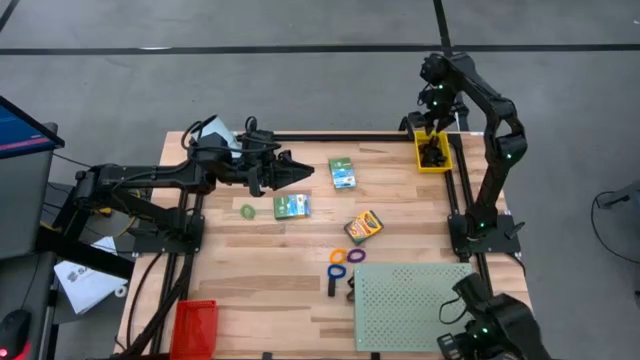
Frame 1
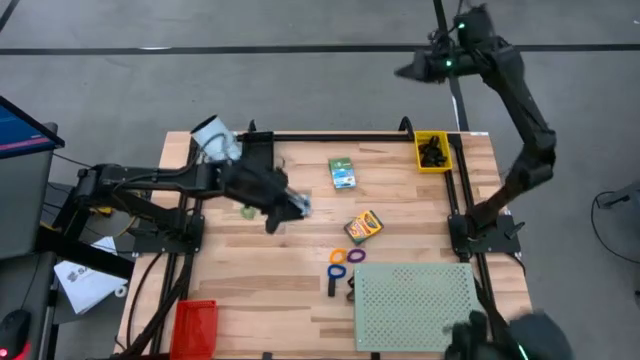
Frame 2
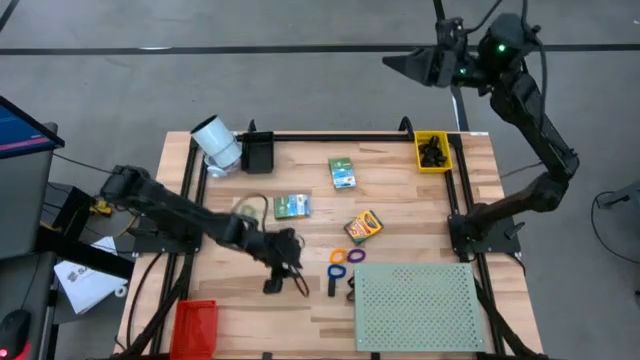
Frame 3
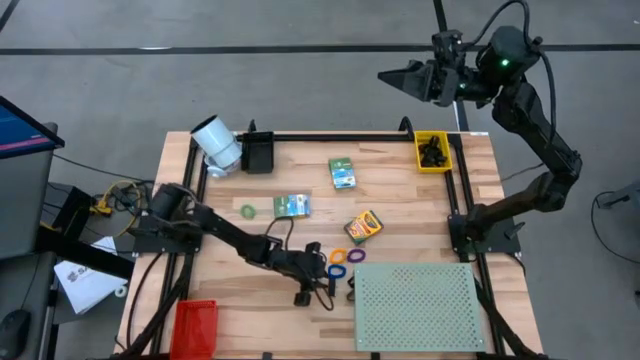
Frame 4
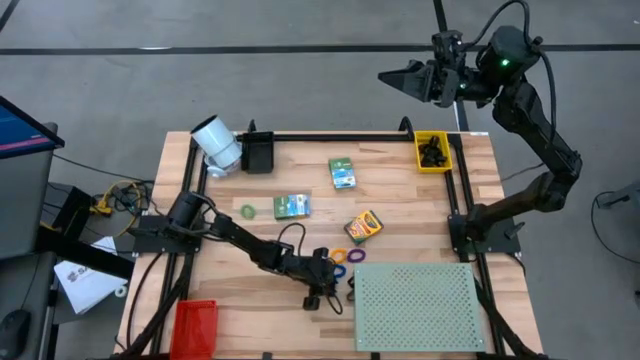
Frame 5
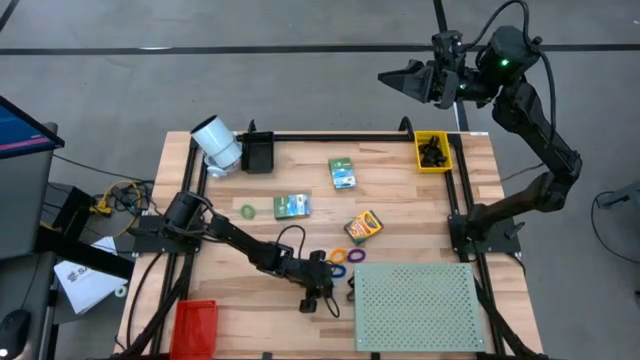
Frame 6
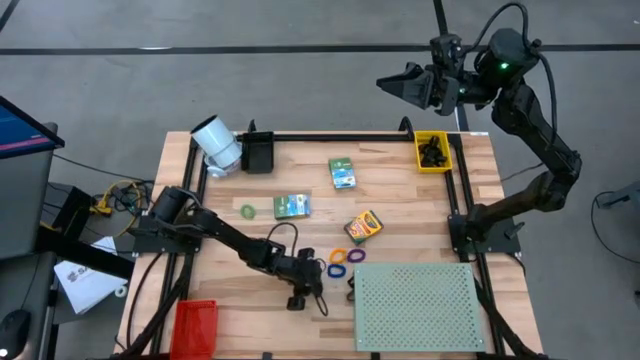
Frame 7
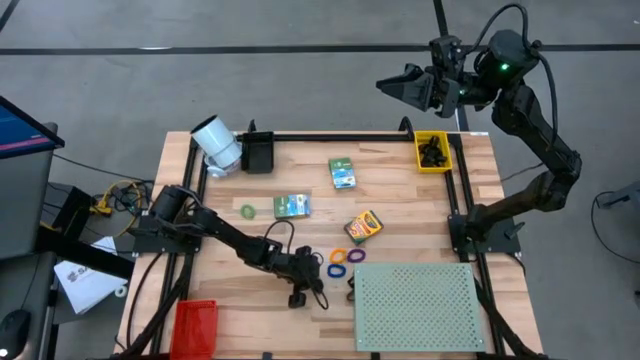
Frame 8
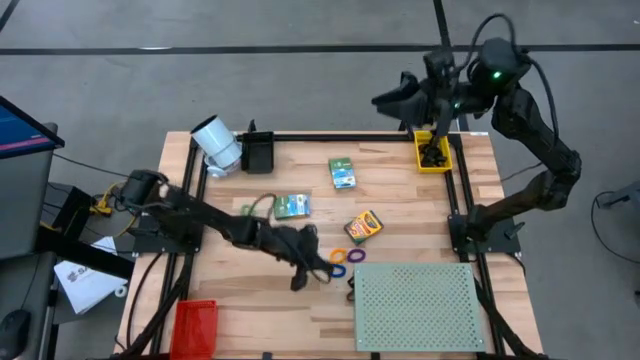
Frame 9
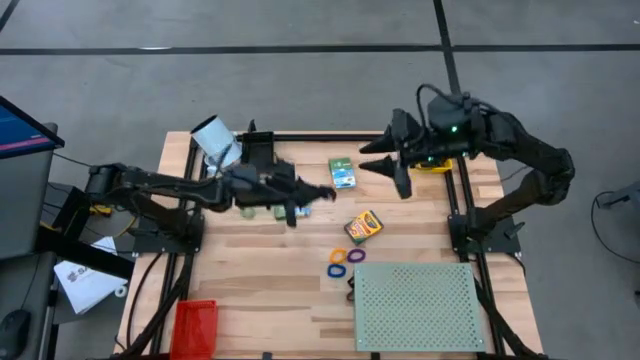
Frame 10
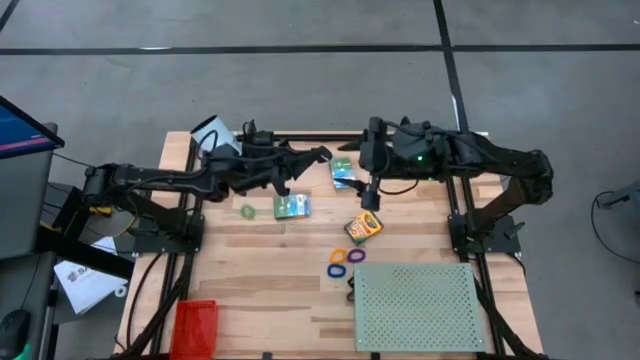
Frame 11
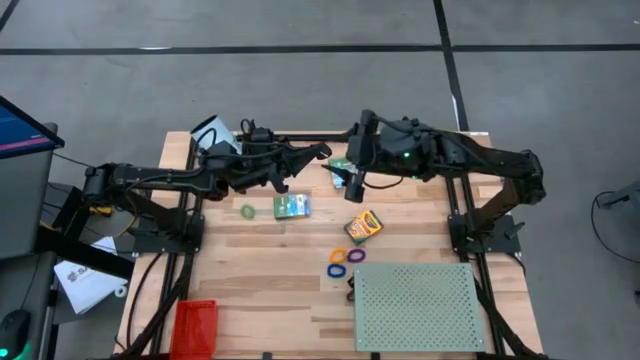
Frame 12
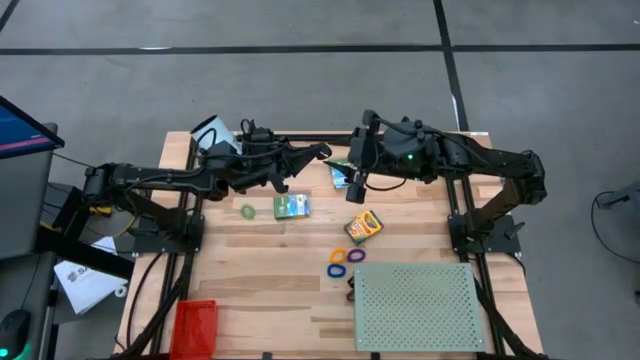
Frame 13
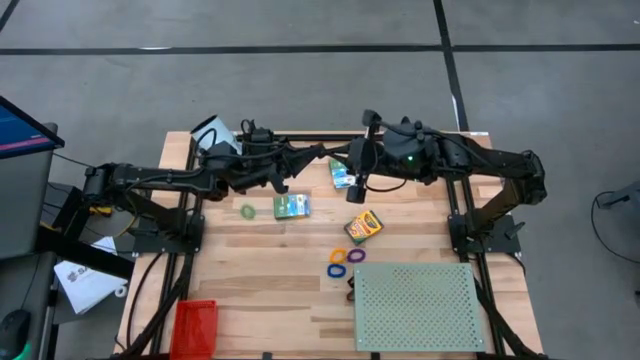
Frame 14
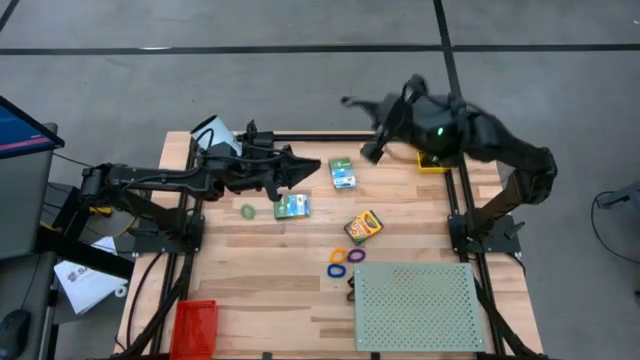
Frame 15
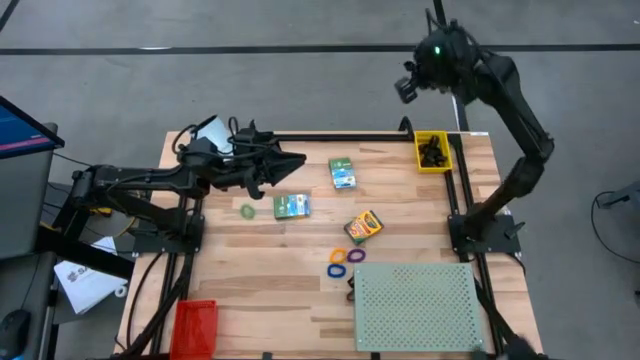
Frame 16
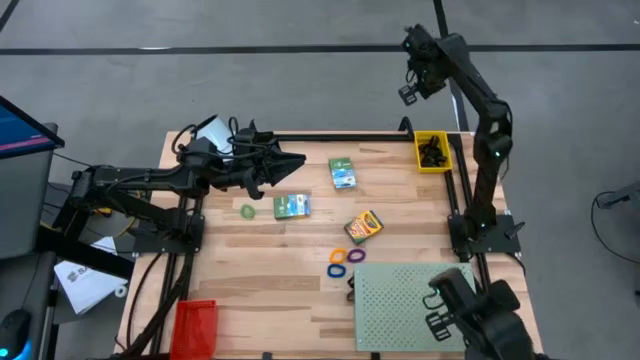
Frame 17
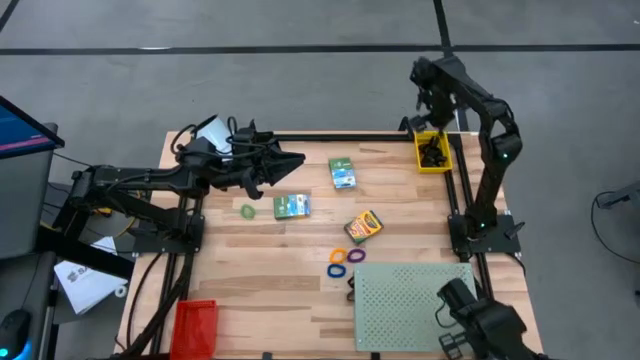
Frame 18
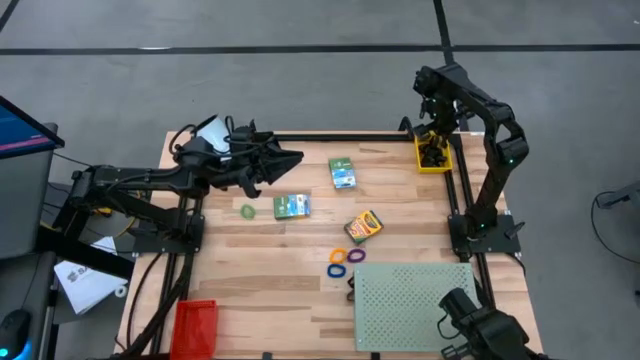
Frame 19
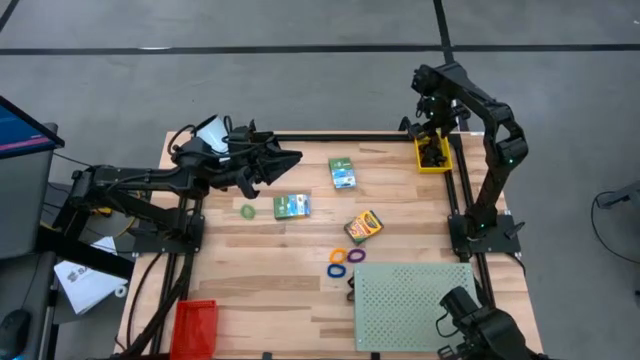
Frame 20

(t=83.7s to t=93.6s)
Task: Pick & Place Office Desk Supplies
Put the black rubber band into the yellow bin

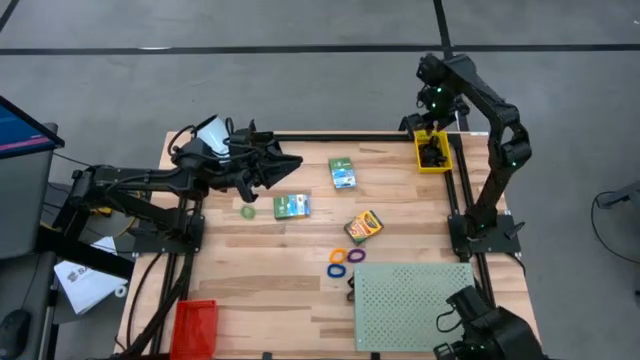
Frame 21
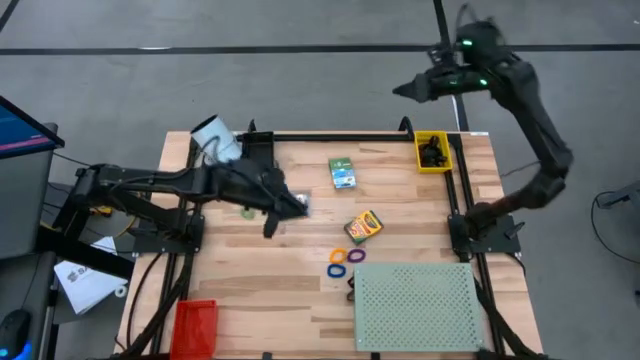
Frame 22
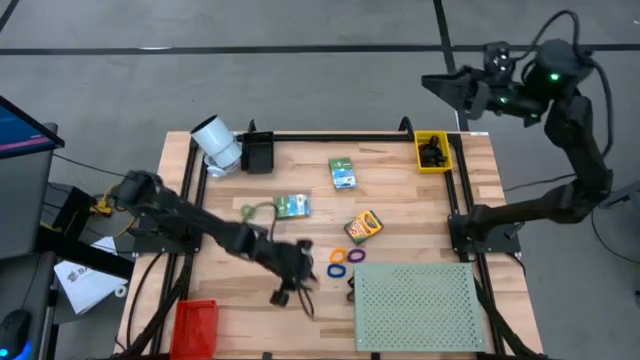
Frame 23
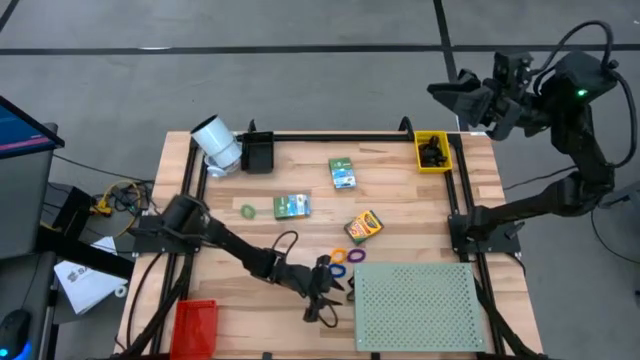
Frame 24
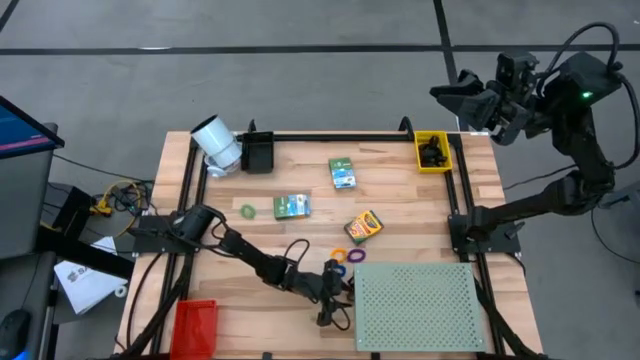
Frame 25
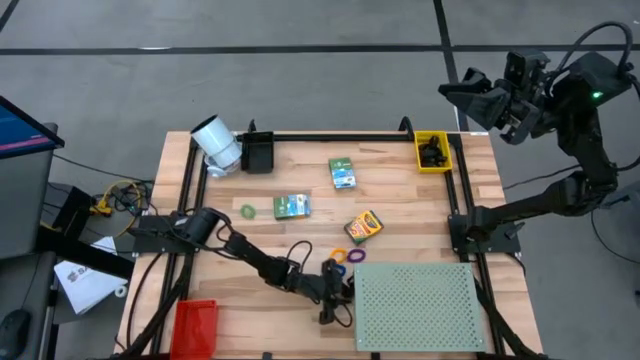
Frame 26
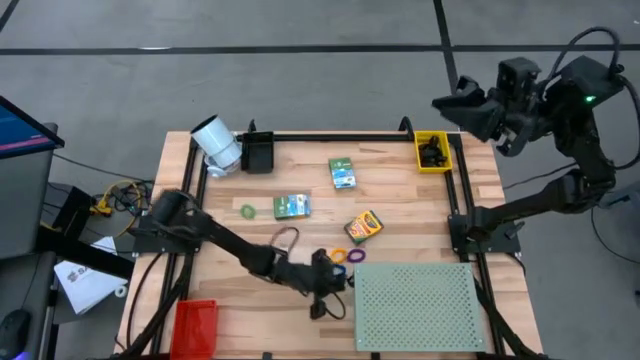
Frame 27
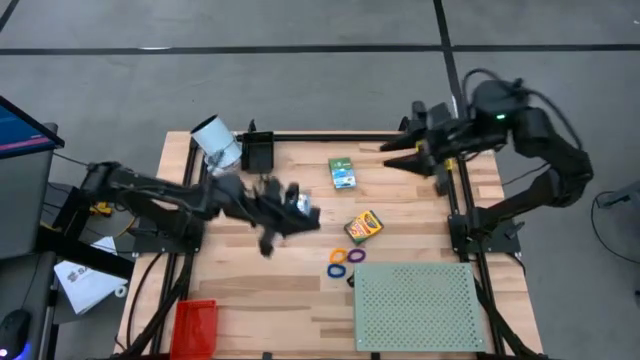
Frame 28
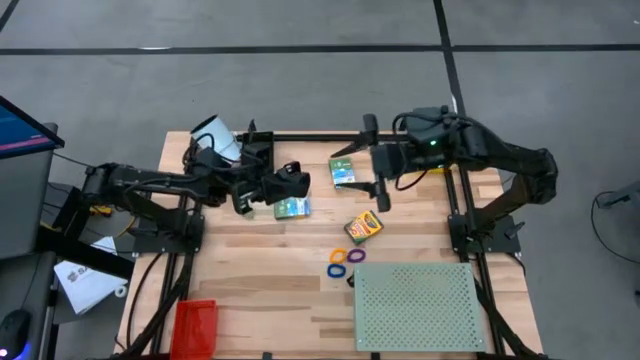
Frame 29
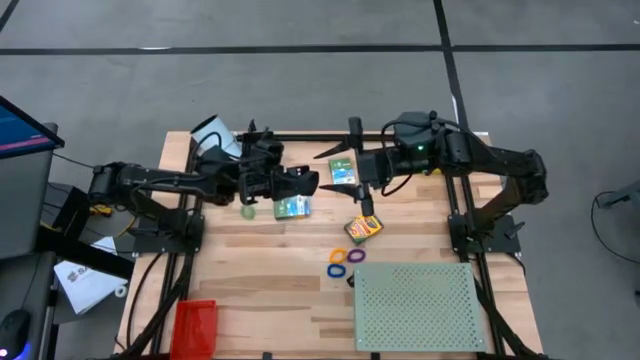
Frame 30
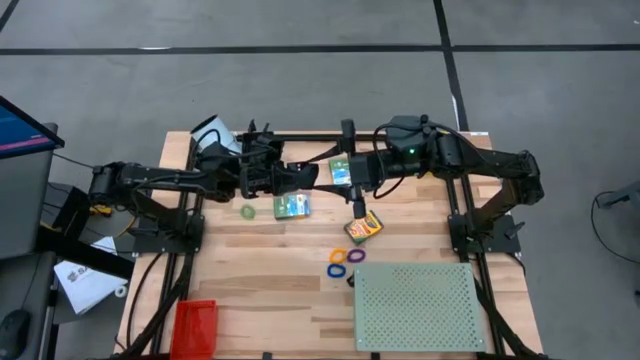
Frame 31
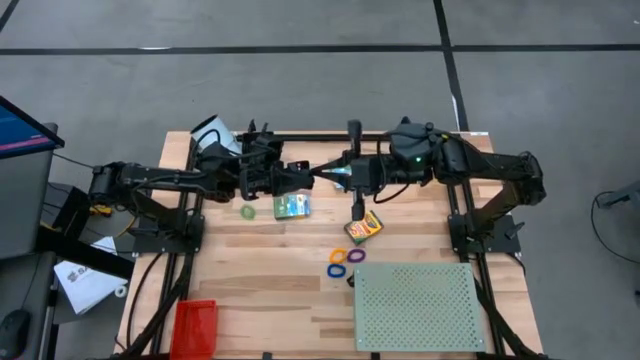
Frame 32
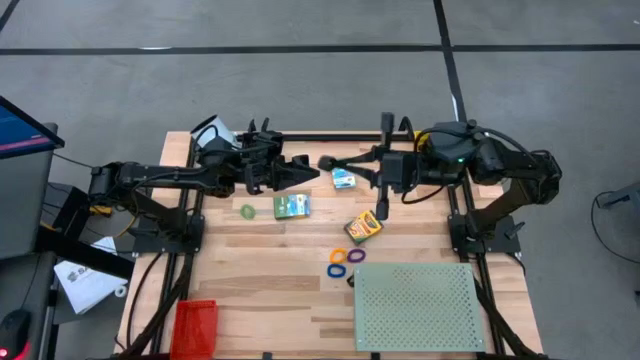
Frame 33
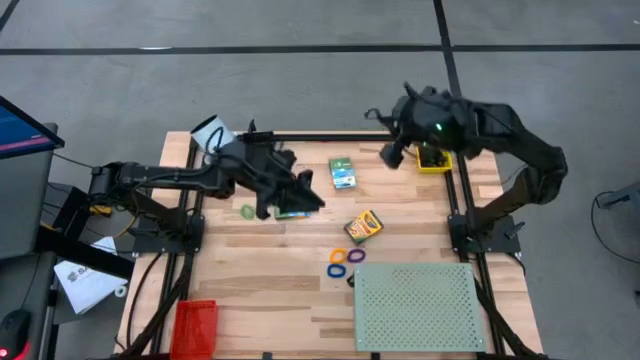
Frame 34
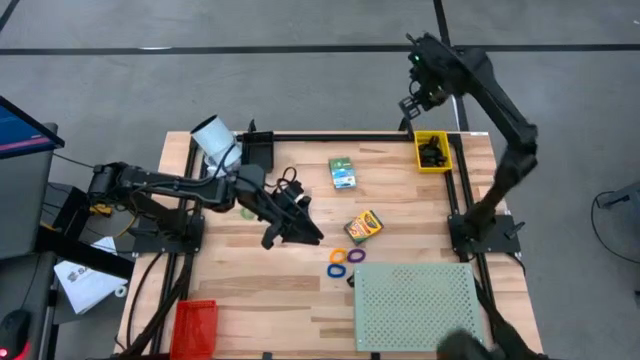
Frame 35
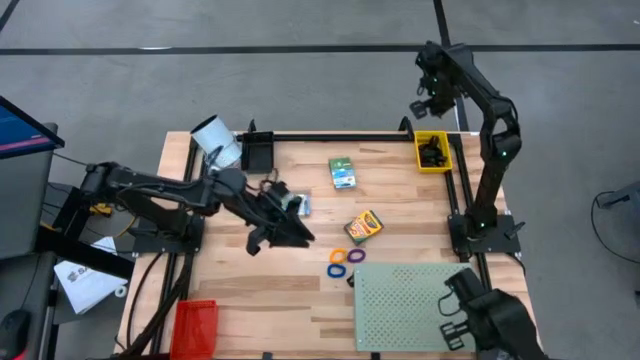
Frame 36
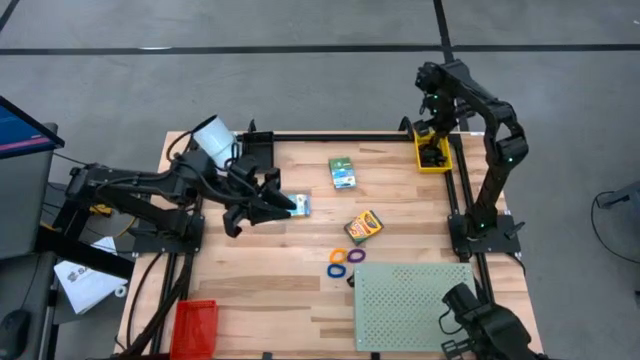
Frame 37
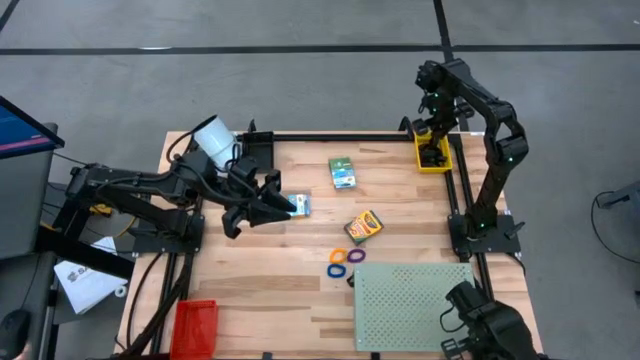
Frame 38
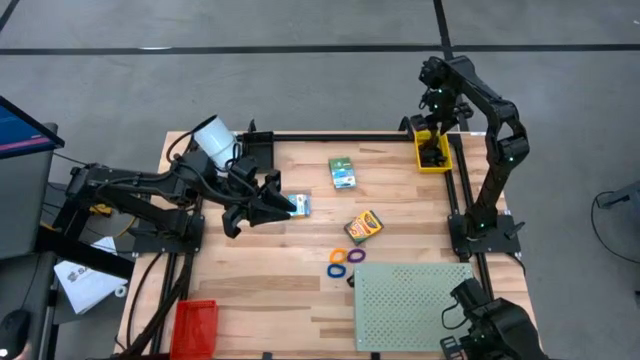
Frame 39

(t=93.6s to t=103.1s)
Put the black rubber band into the yellow bin

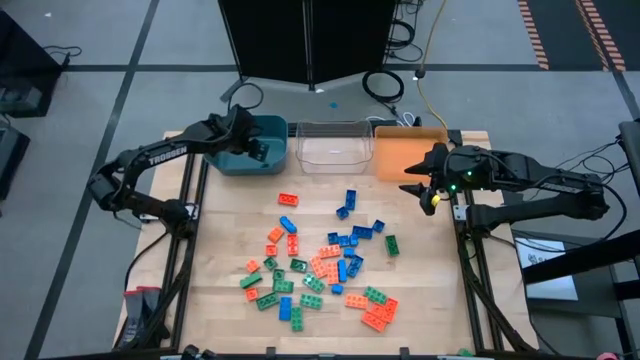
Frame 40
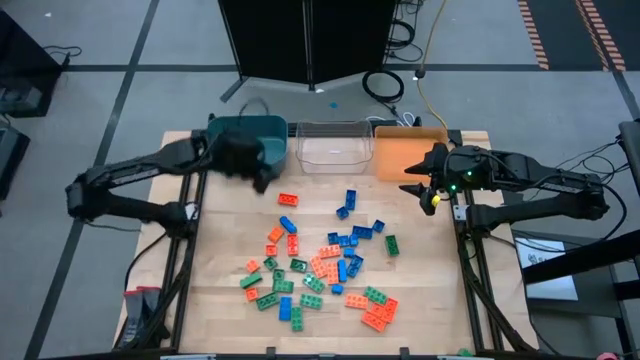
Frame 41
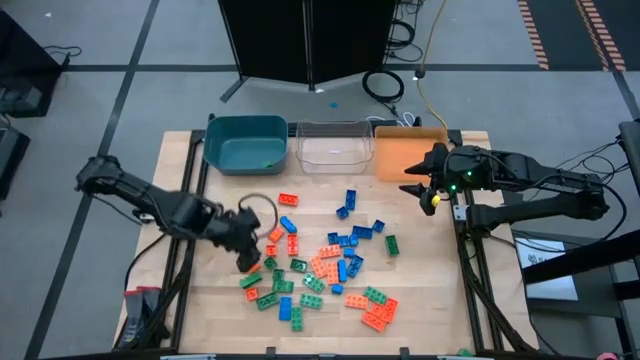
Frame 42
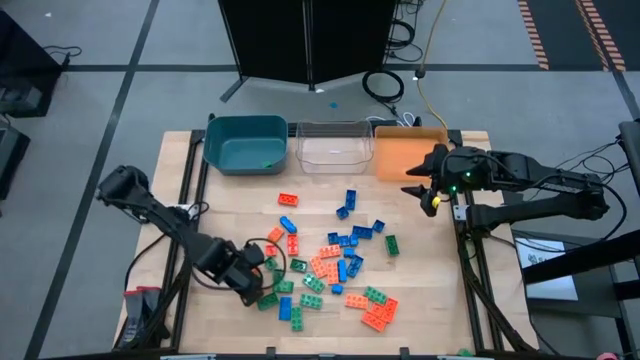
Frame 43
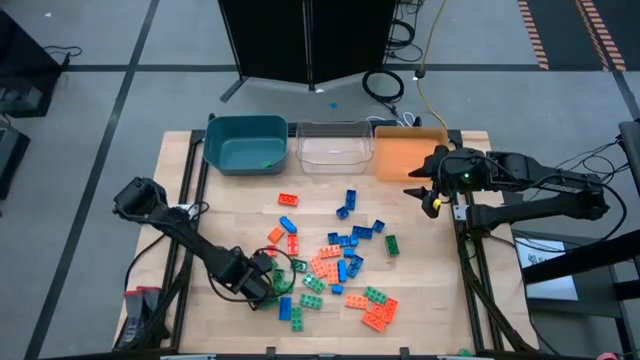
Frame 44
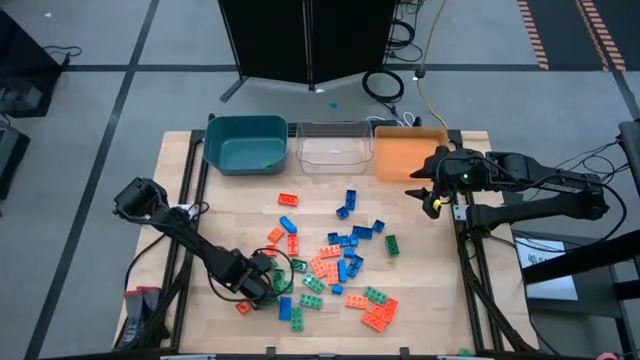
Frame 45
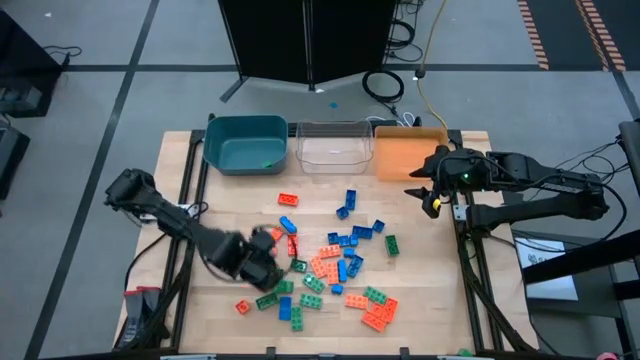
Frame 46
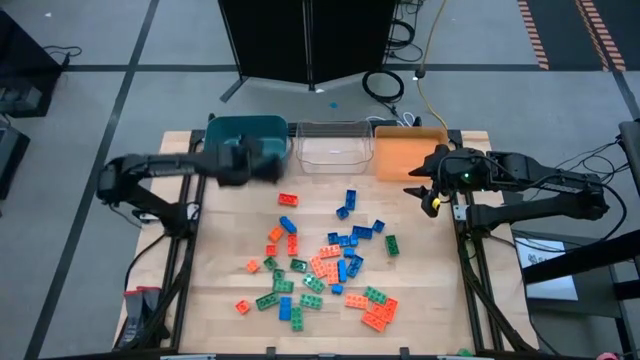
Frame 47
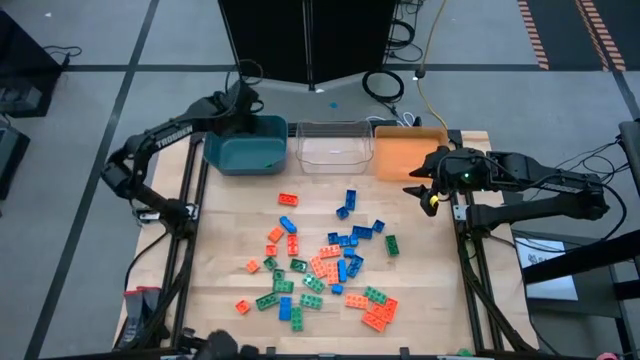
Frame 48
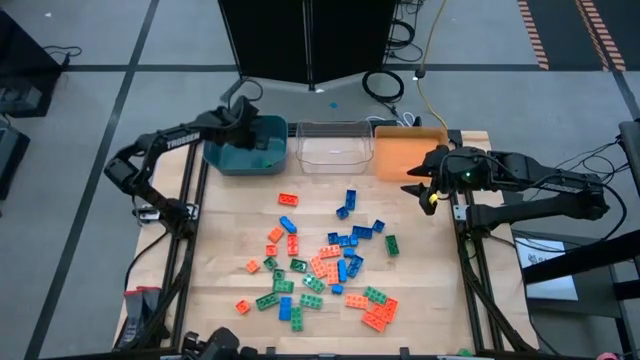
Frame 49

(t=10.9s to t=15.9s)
Task: Sort blocks
Put the green game piece into the blue bin
